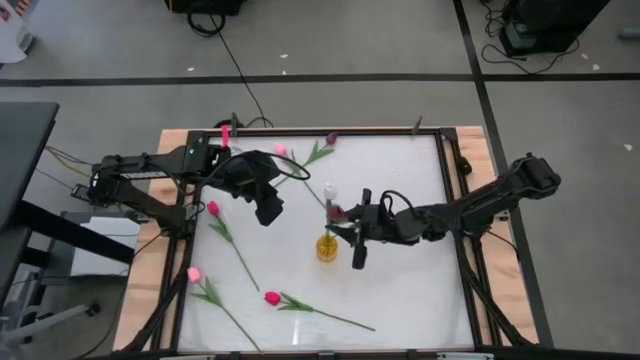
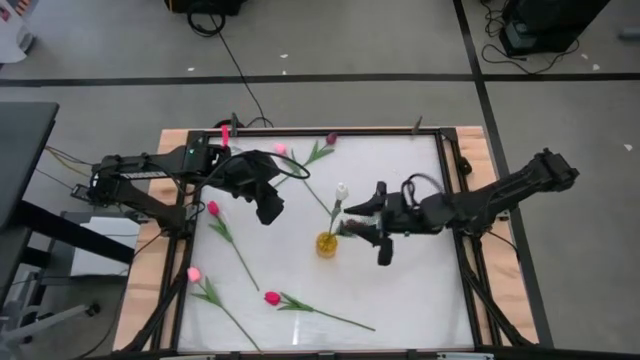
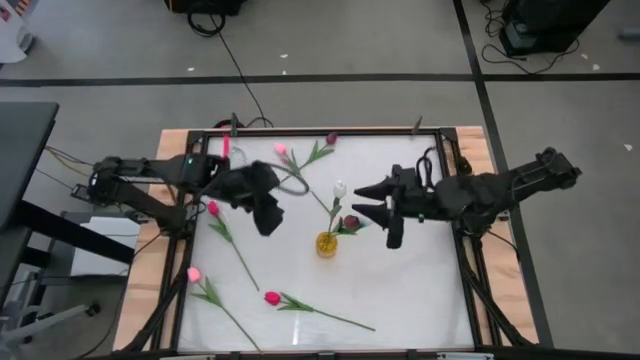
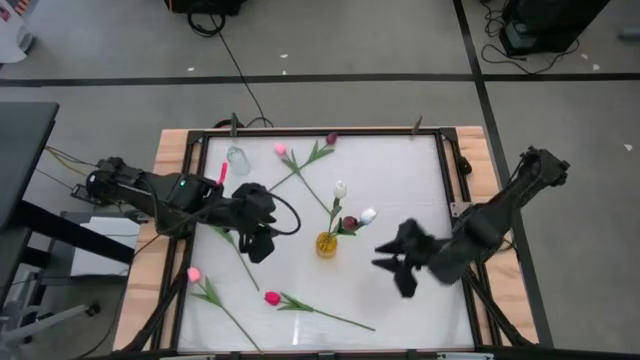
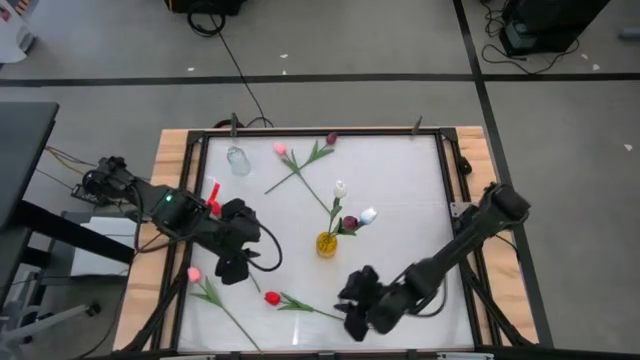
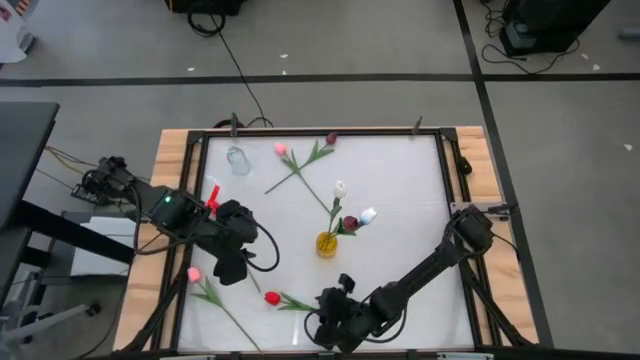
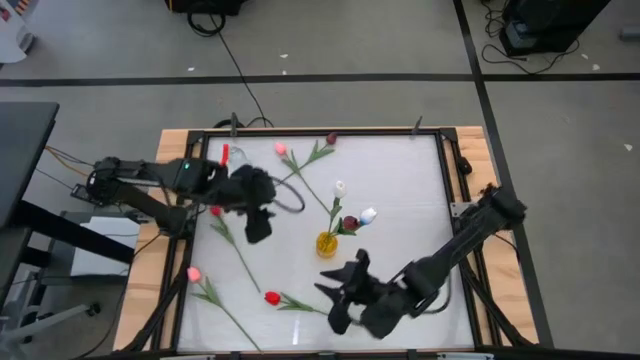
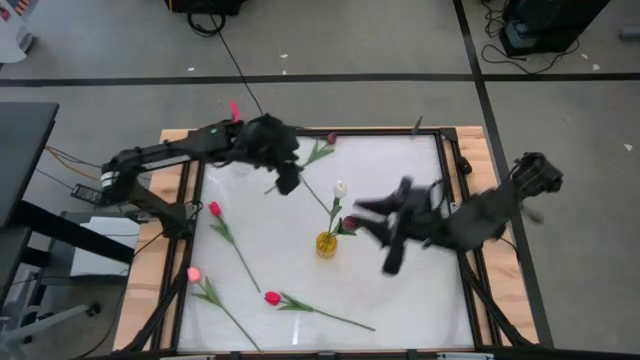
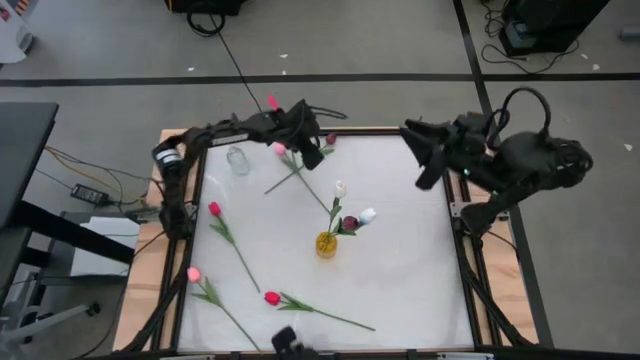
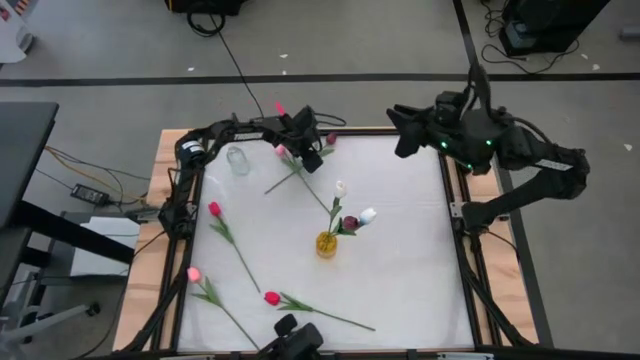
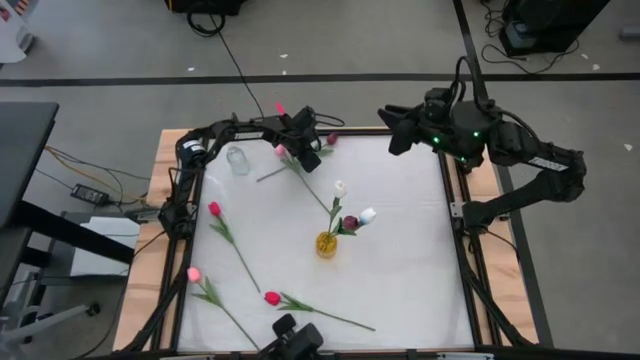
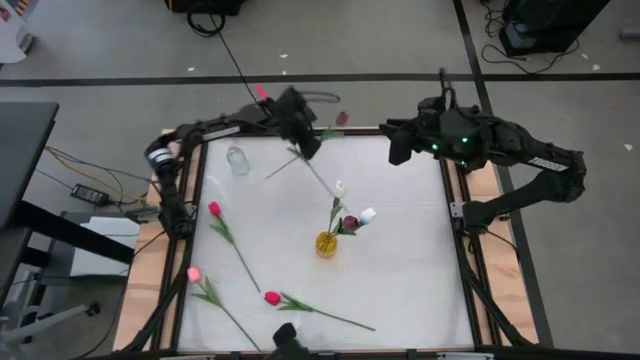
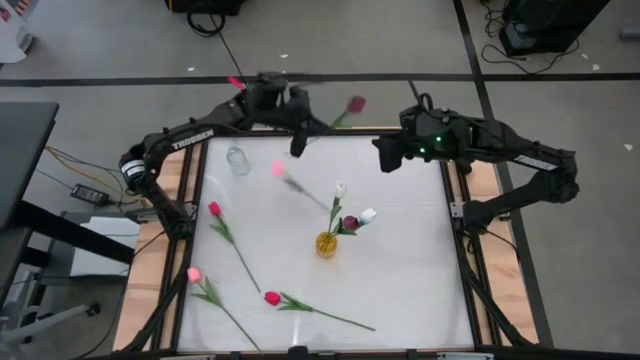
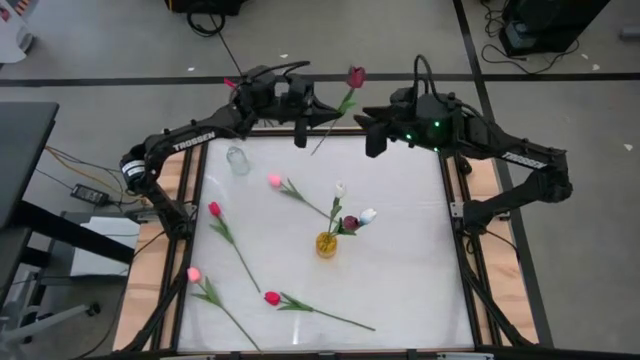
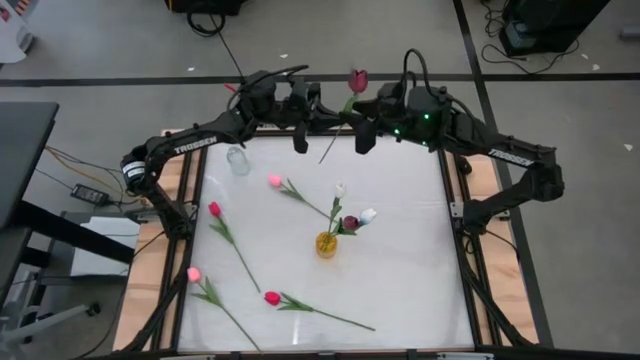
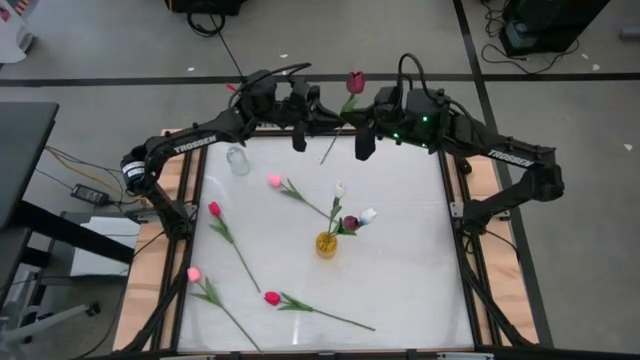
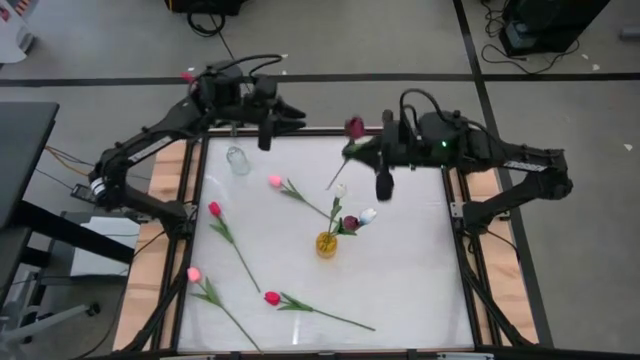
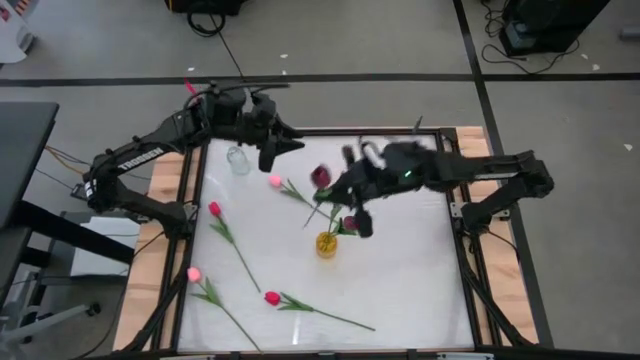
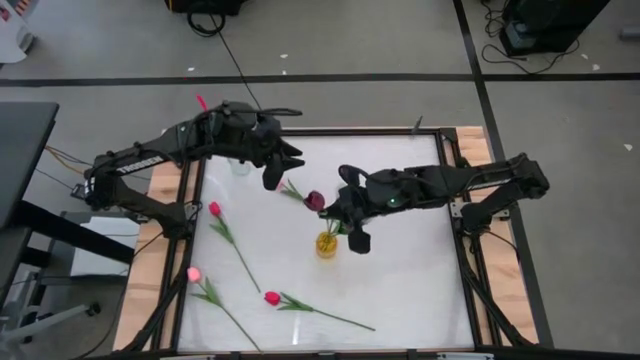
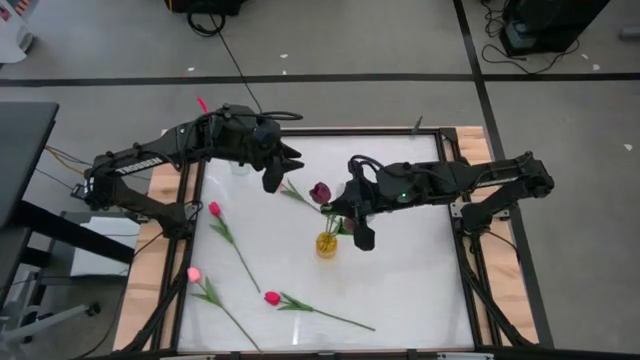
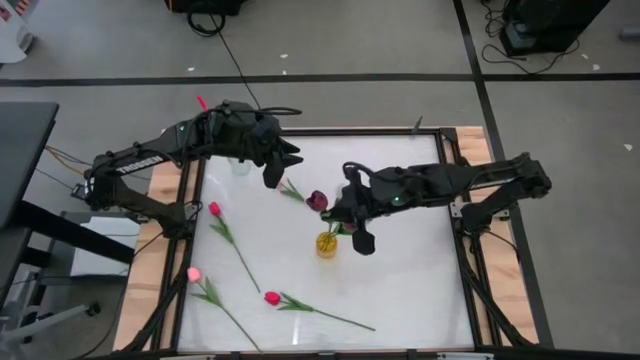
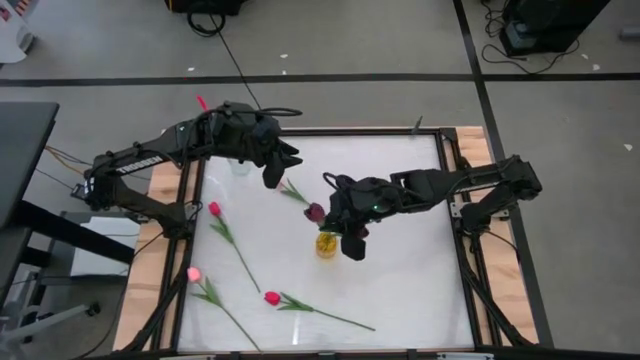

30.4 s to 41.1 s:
Task: Sort flowers into vase by color
Put the dark red tulip into the yellow flower vase

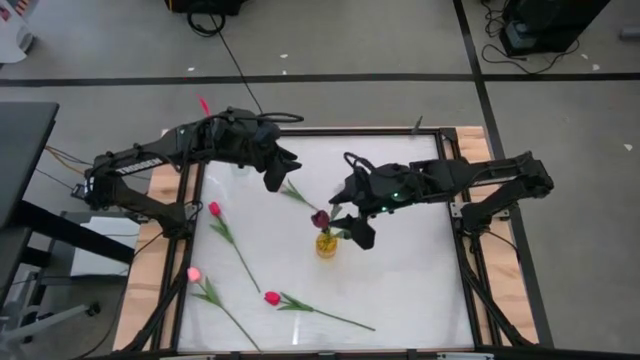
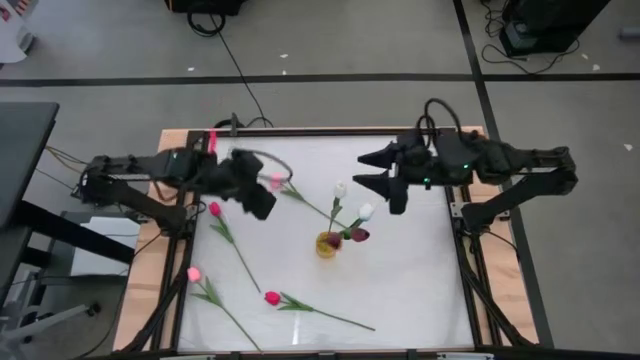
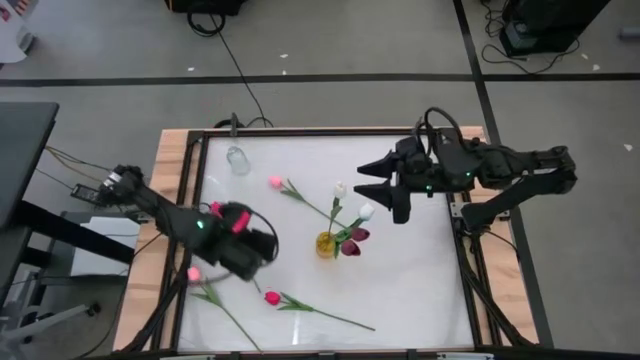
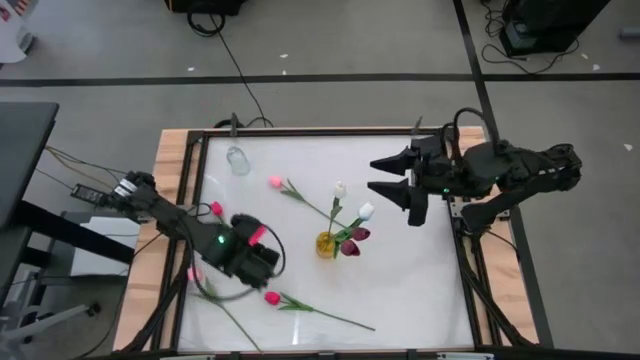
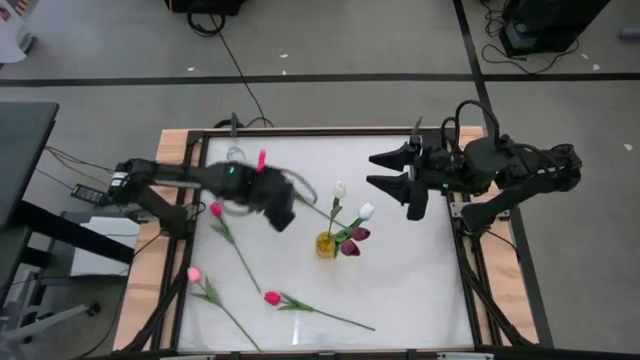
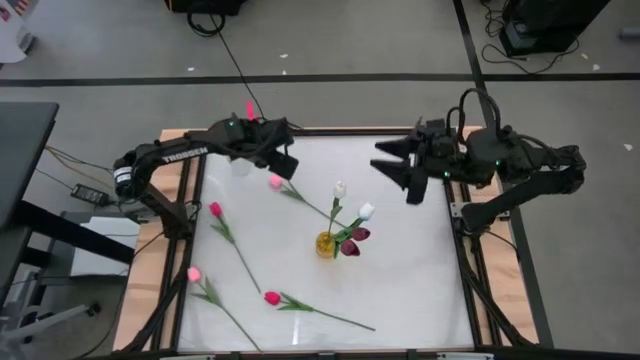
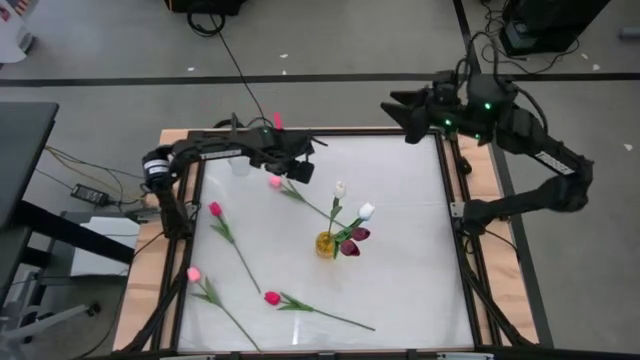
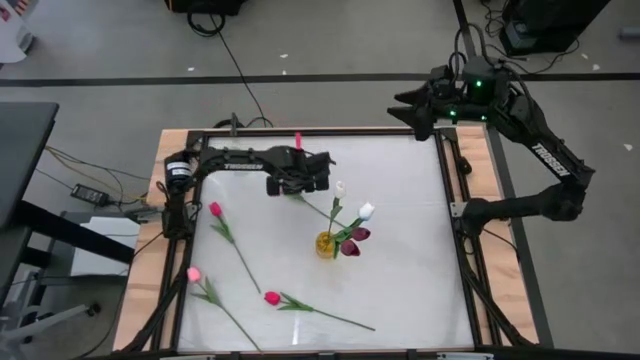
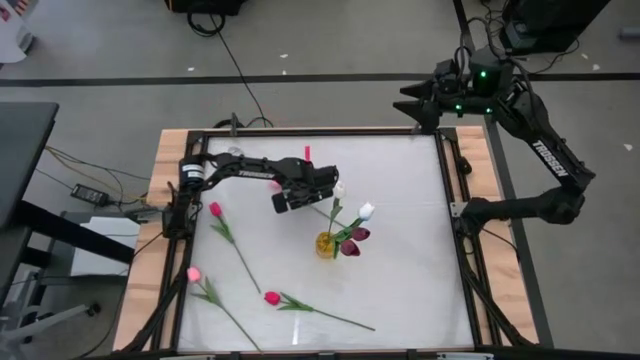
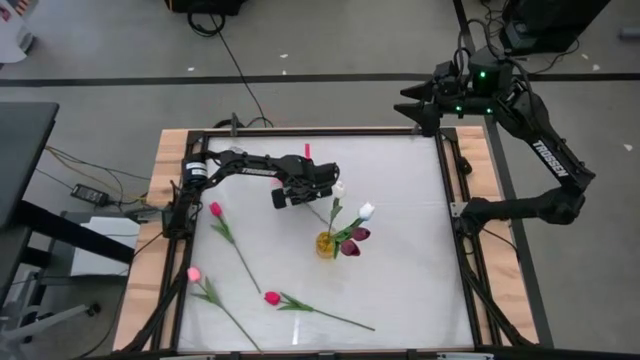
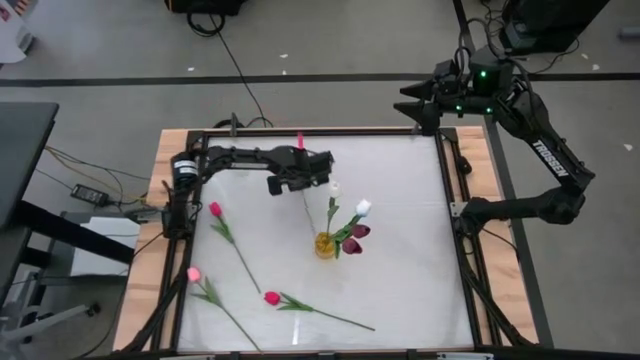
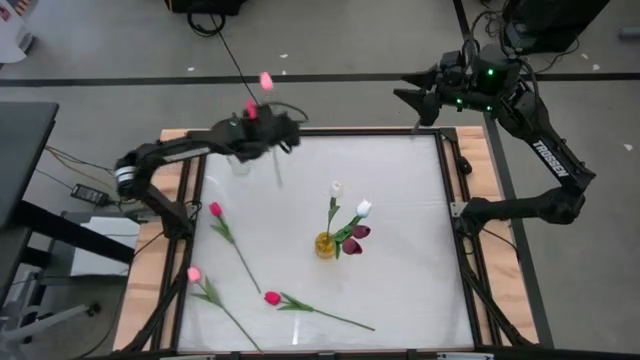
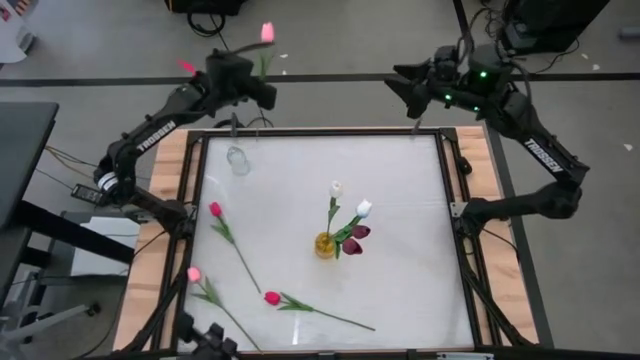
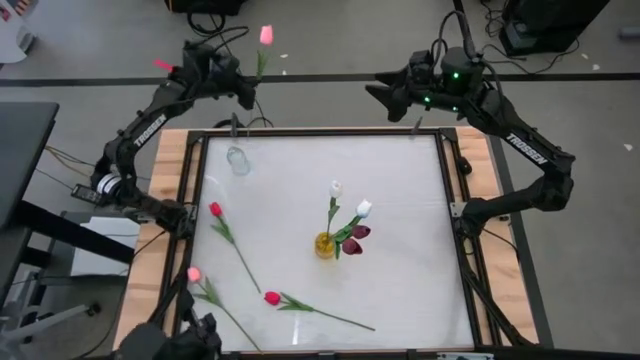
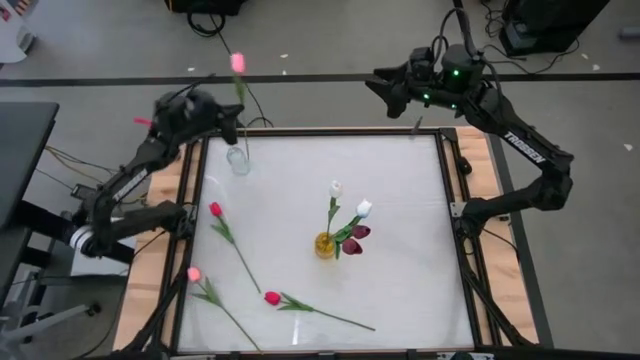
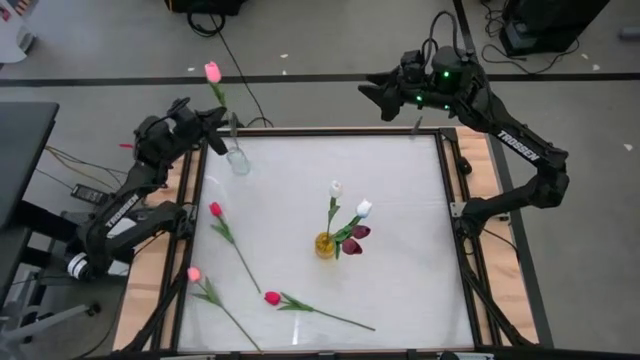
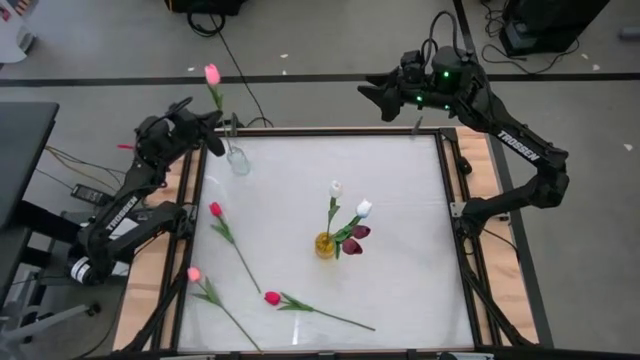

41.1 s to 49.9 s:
Put the top pink tulip into the transparent flower vase

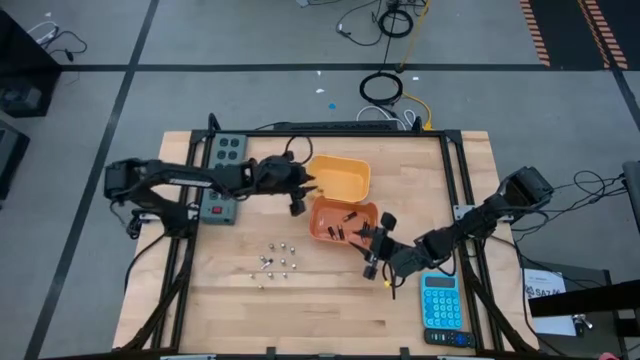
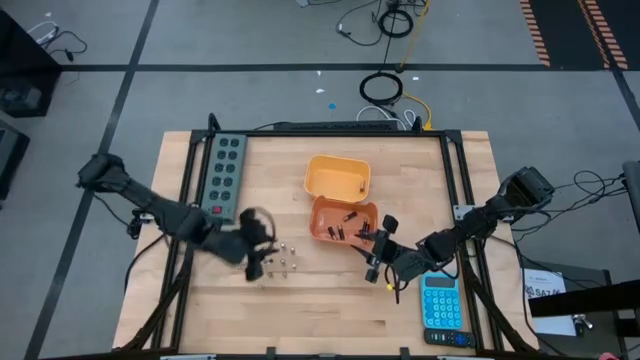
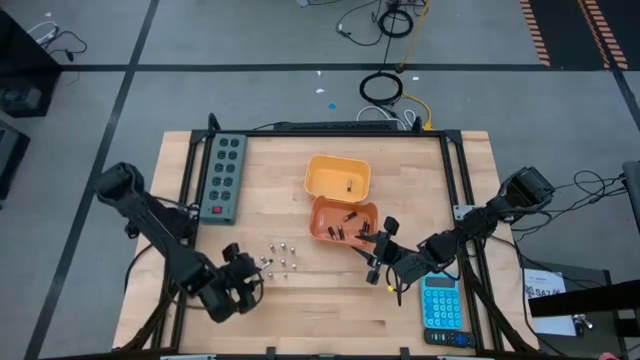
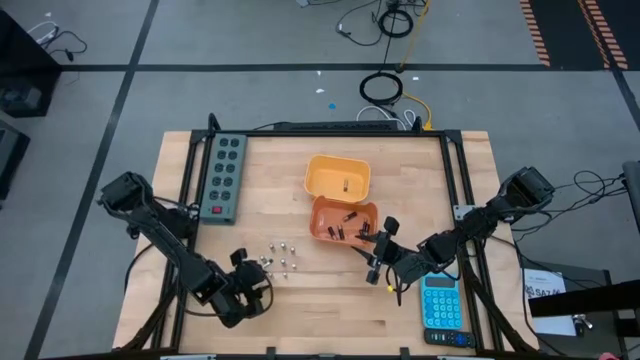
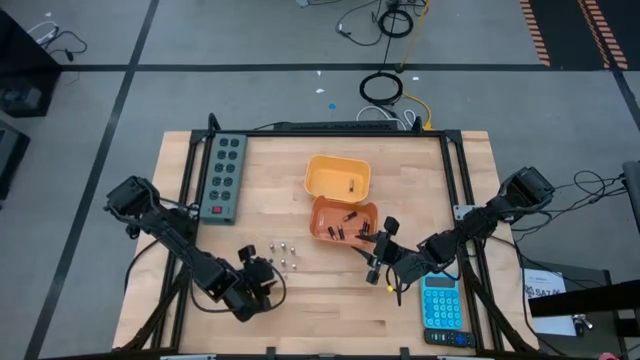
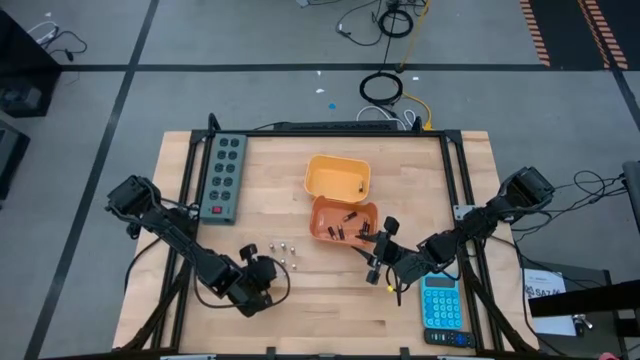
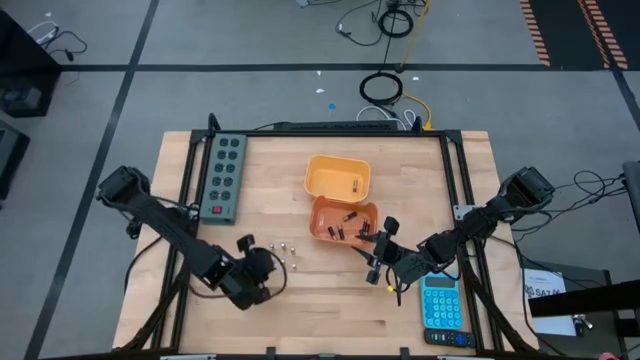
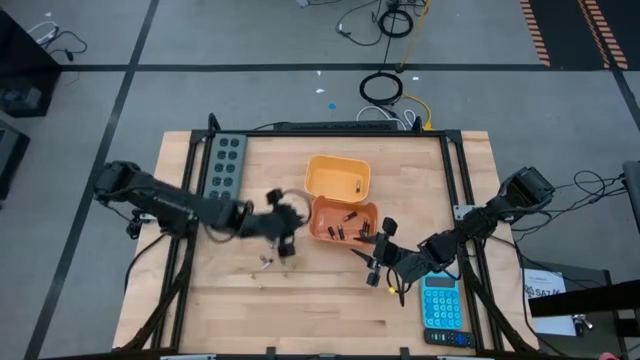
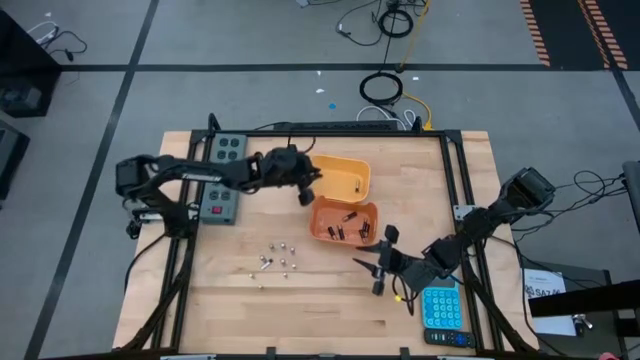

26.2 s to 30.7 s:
Task: Sort batteries
Put the silver battery into the yellow bin
